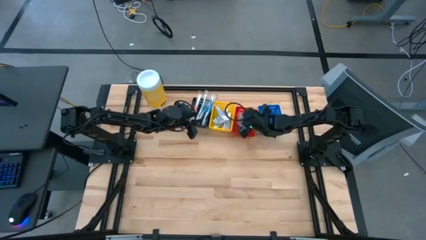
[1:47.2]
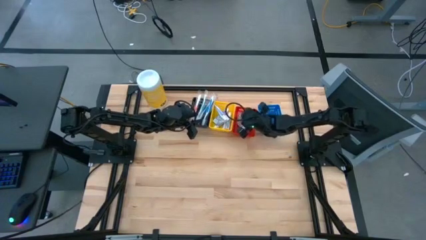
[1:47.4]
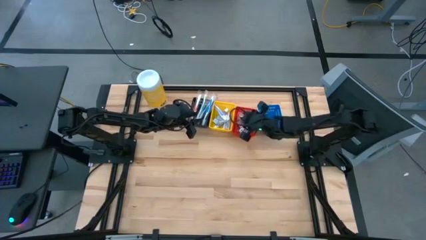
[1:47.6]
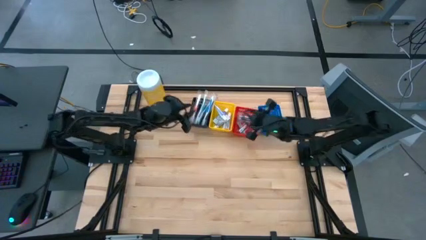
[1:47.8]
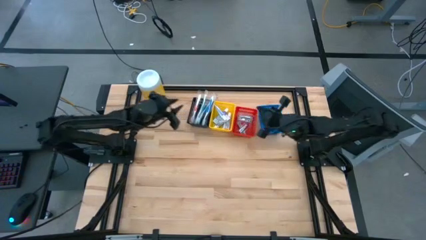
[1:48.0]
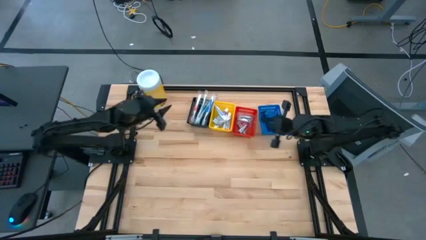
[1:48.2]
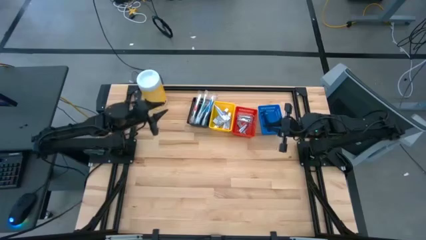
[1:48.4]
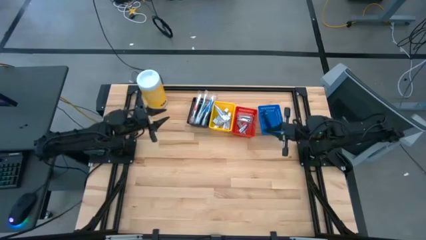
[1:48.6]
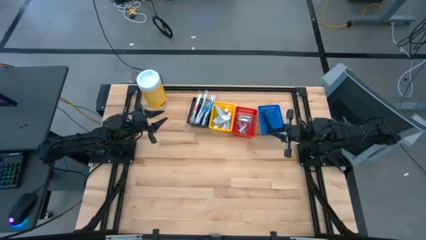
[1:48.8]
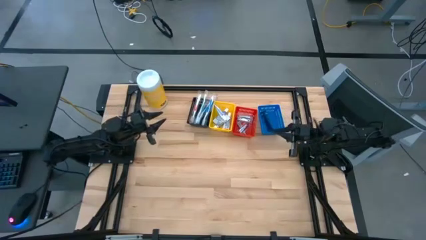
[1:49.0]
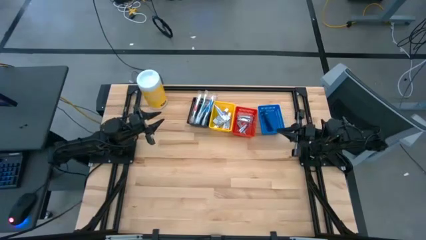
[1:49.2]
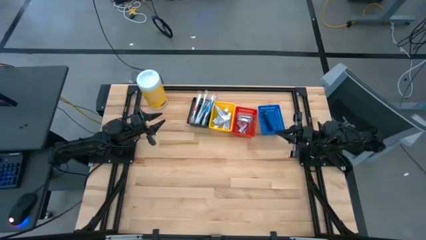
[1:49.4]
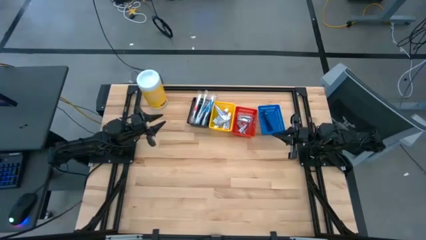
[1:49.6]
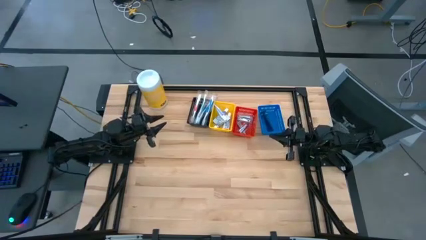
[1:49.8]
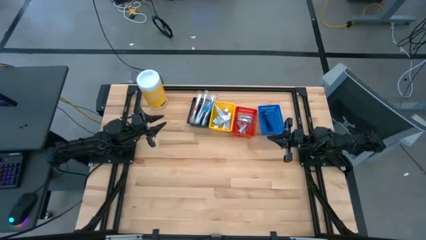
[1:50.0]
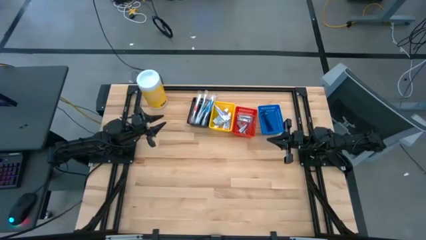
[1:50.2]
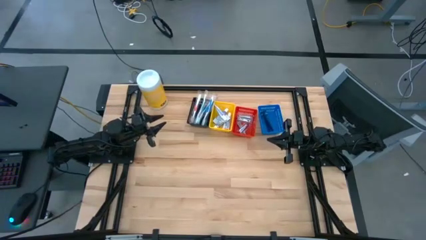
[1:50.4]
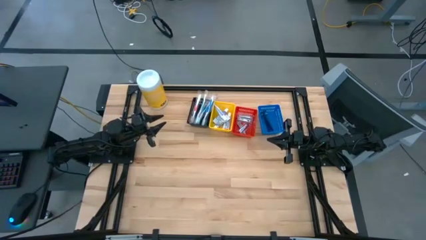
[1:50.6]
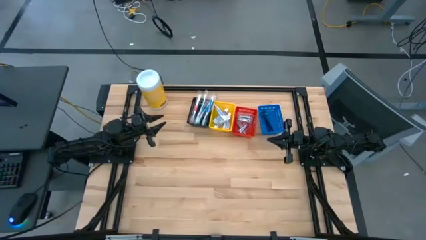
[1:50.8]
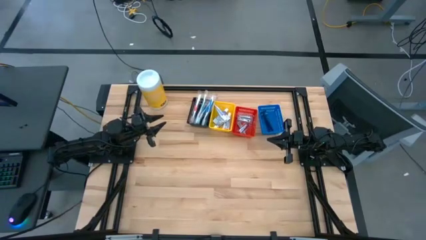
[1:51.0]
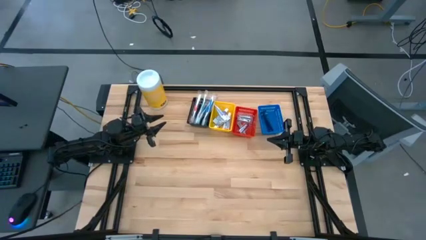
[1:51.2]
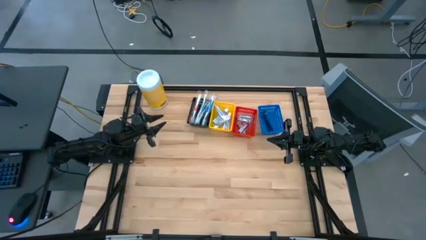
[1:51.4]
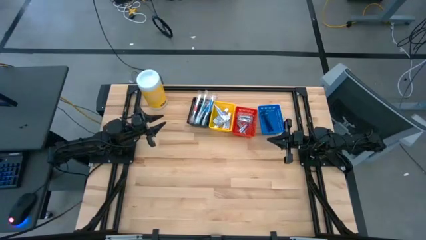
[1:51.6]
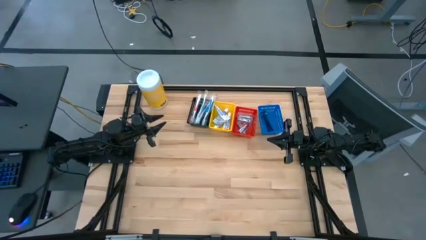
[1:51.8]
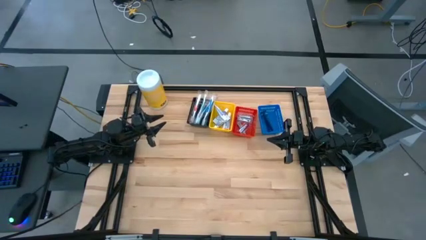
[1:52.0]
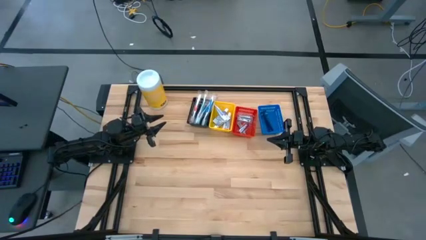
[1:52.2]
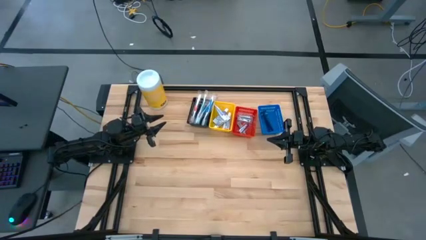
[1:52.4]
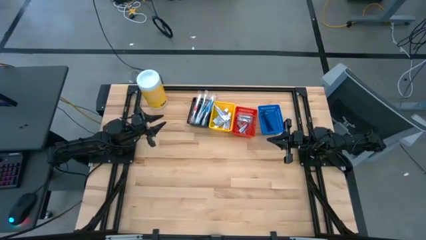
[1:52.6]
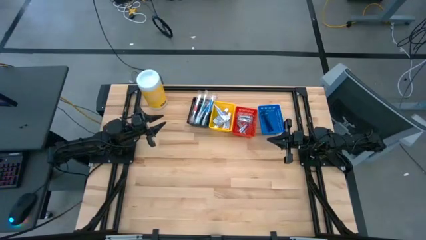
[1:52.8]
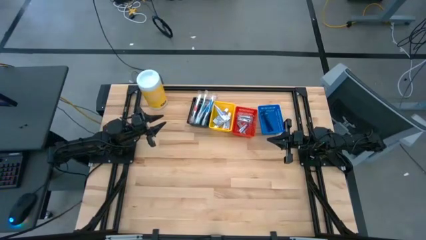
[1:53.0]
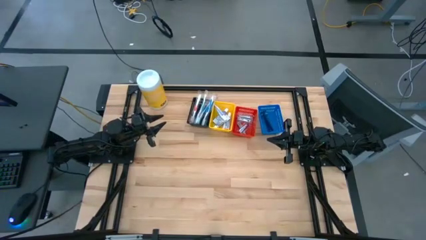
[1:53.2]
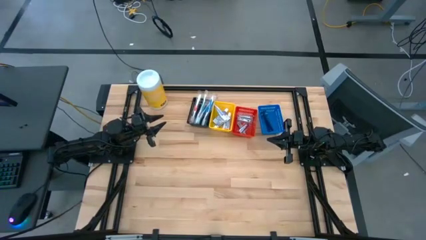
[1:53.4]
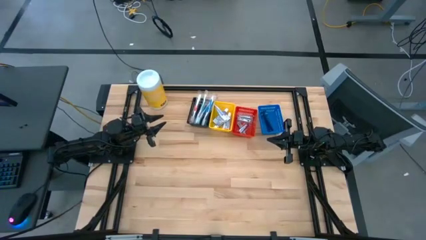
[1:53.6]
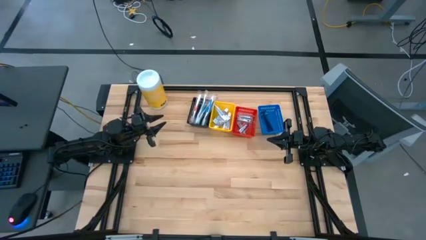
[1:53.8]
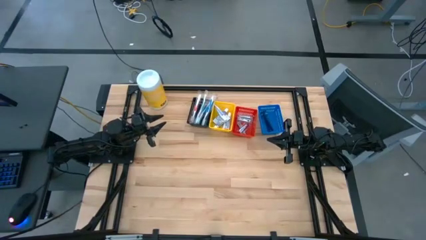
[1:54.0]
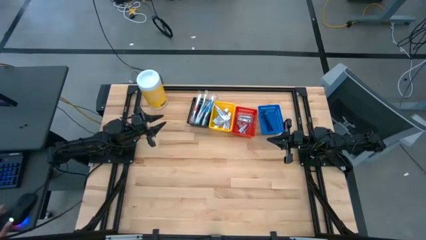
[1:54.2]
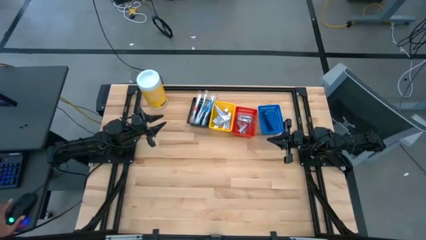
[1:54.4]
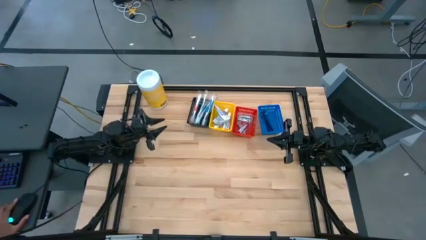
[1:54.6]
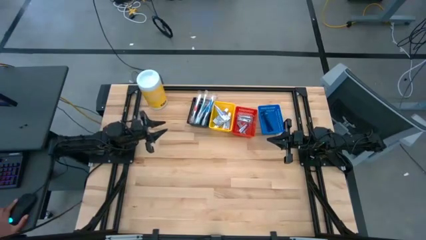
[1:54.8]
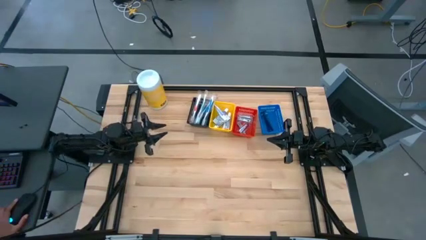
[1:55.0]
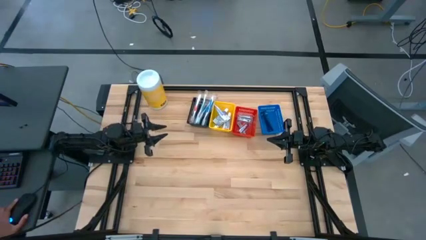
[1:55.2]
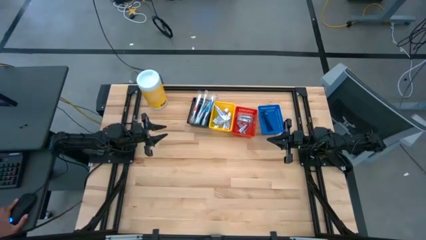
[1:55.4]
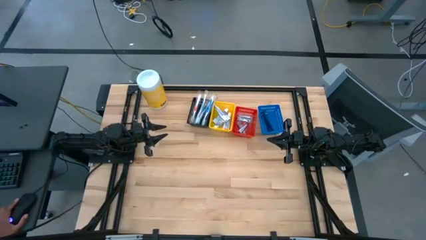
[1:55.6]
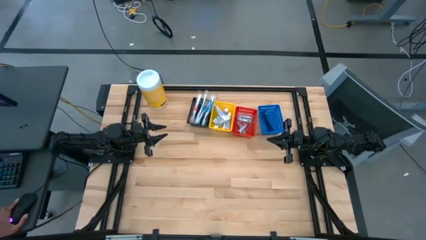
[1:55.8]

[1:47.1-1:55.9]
Task: Pick & Place Travel size toiletries
Return to Home Position

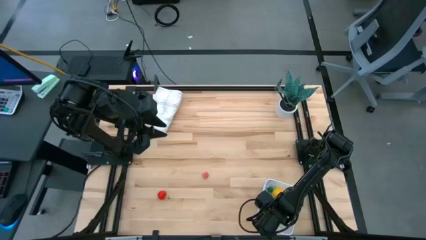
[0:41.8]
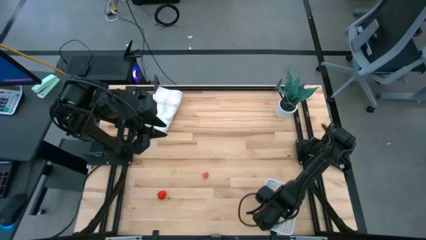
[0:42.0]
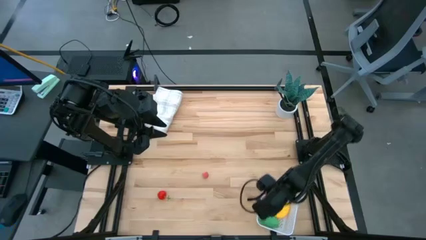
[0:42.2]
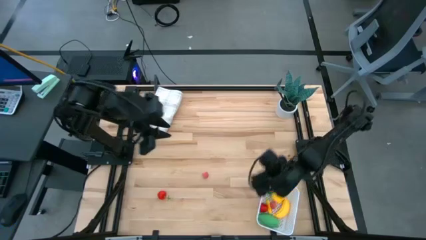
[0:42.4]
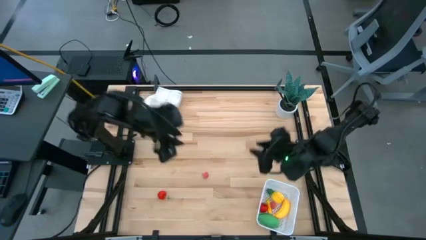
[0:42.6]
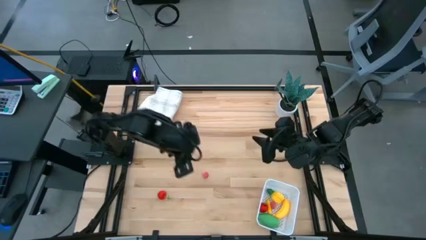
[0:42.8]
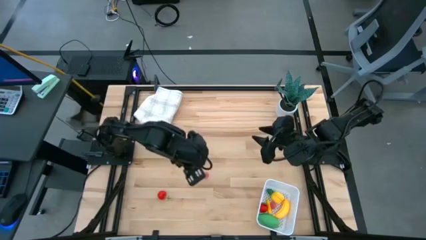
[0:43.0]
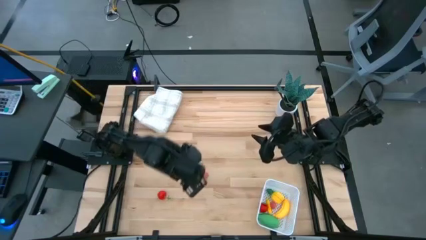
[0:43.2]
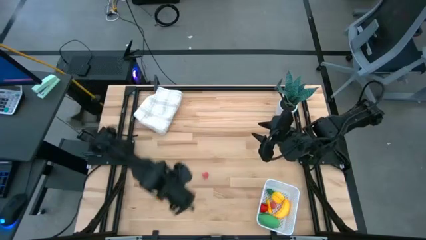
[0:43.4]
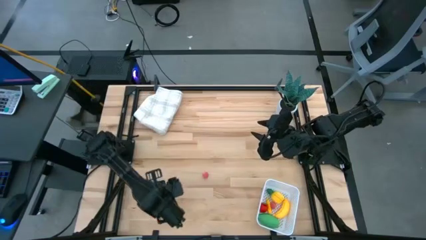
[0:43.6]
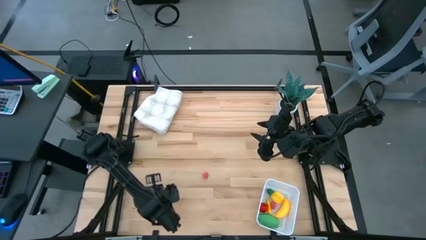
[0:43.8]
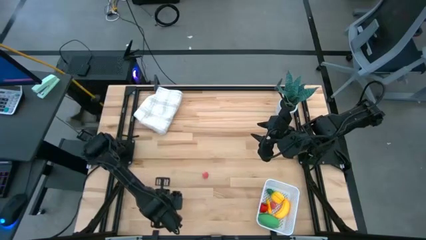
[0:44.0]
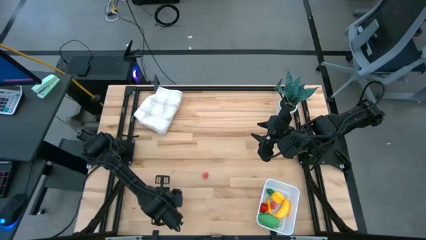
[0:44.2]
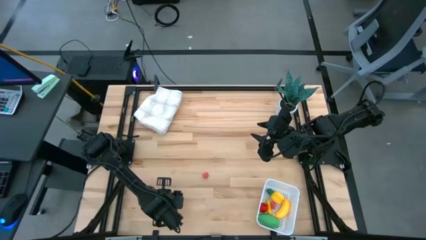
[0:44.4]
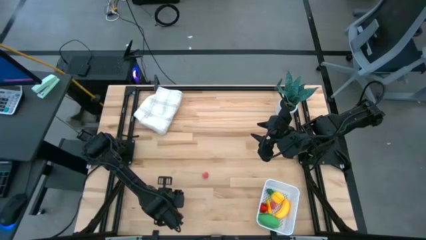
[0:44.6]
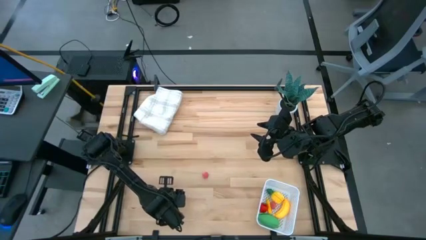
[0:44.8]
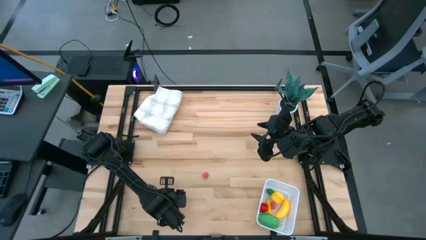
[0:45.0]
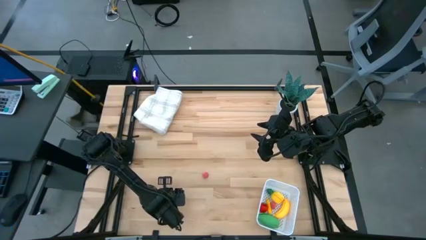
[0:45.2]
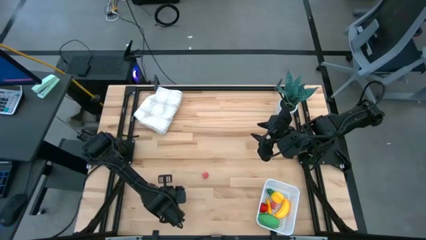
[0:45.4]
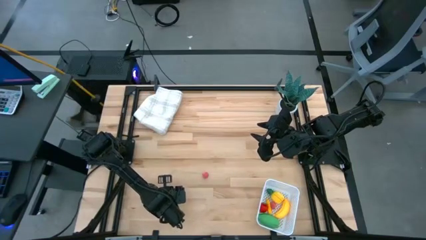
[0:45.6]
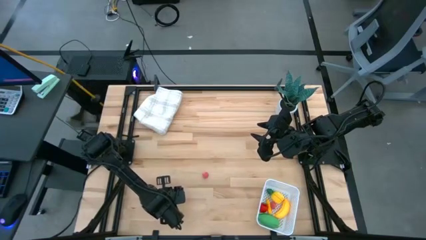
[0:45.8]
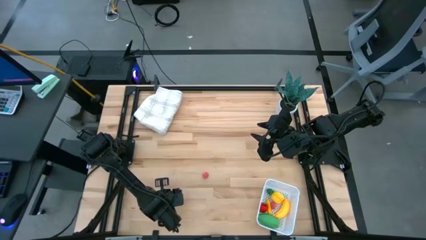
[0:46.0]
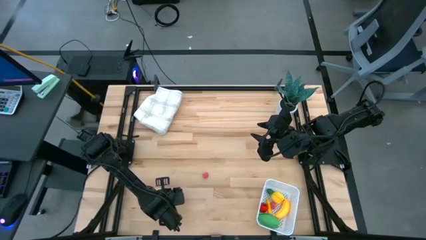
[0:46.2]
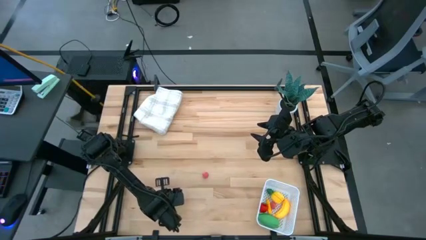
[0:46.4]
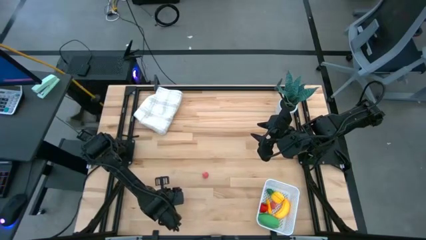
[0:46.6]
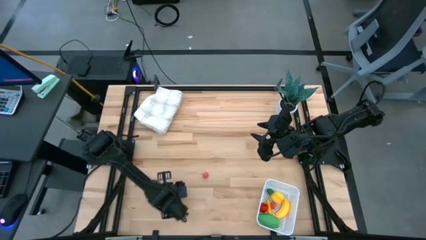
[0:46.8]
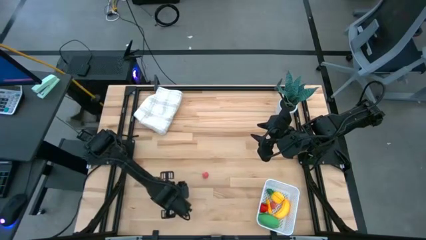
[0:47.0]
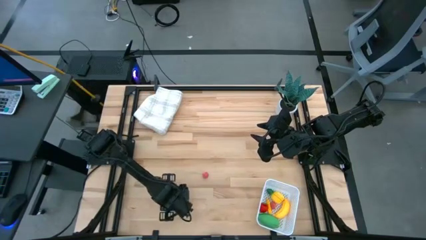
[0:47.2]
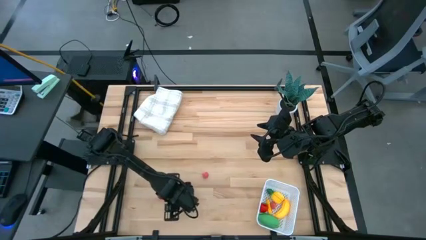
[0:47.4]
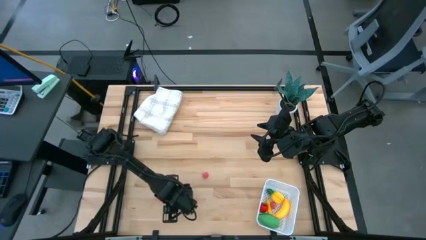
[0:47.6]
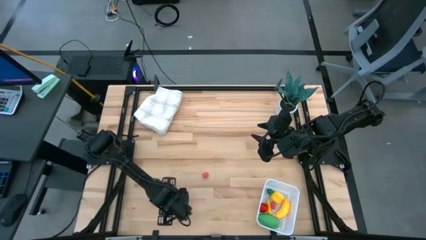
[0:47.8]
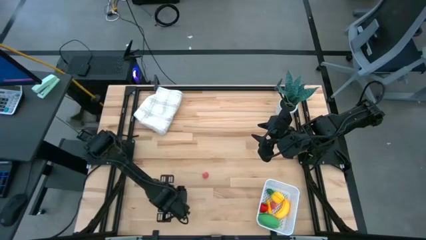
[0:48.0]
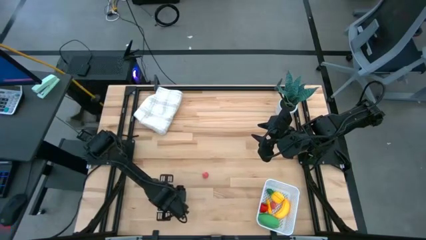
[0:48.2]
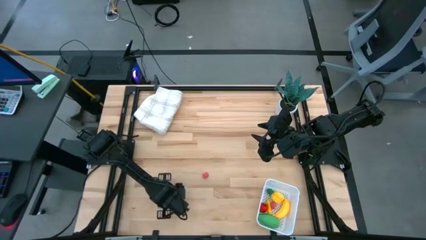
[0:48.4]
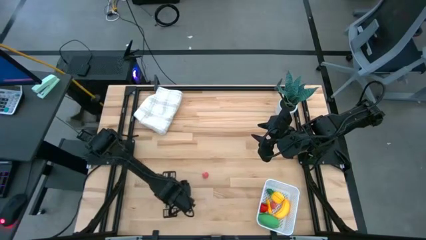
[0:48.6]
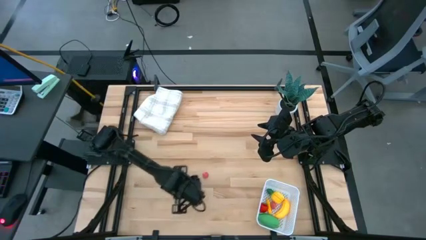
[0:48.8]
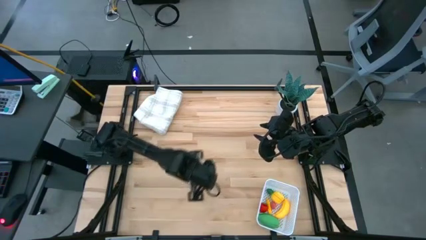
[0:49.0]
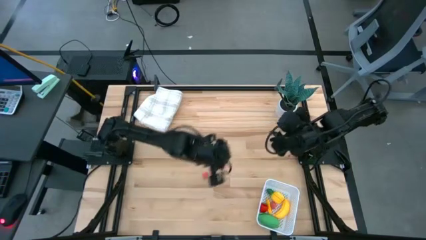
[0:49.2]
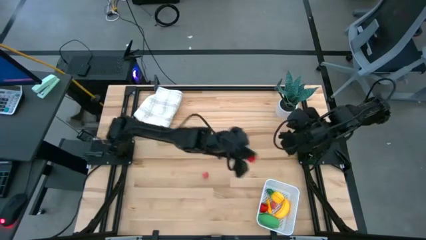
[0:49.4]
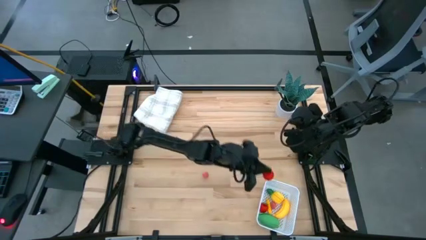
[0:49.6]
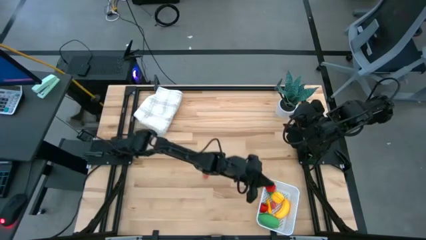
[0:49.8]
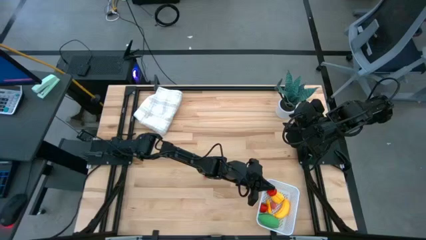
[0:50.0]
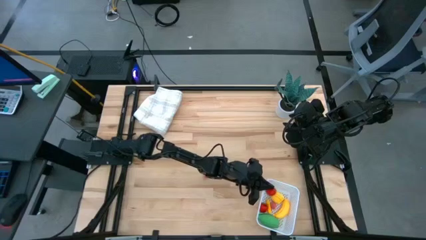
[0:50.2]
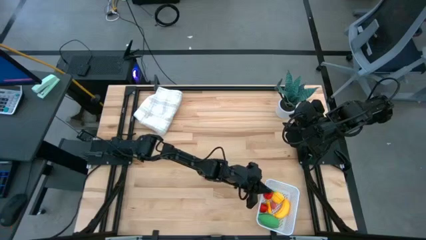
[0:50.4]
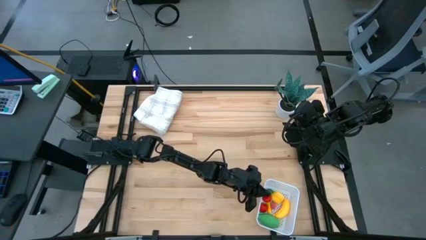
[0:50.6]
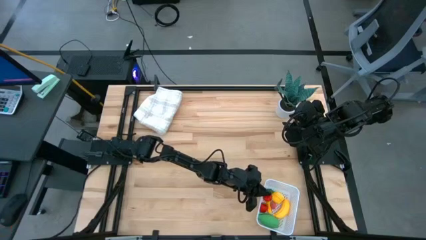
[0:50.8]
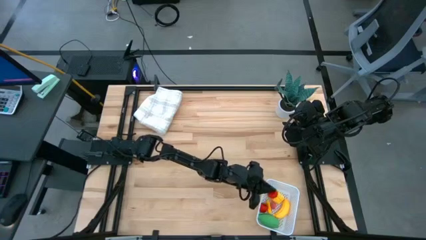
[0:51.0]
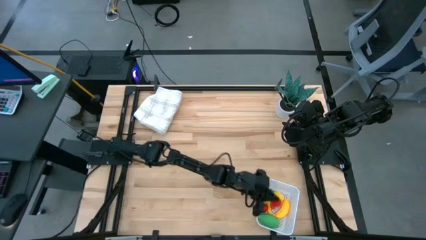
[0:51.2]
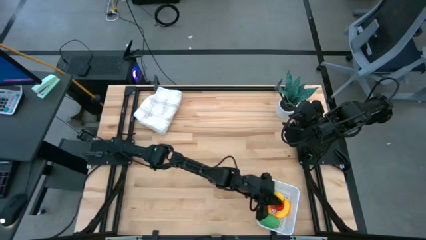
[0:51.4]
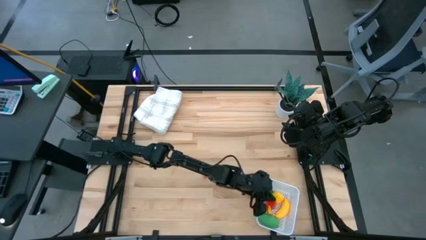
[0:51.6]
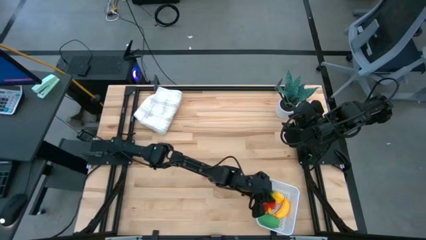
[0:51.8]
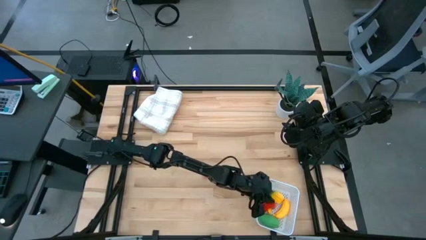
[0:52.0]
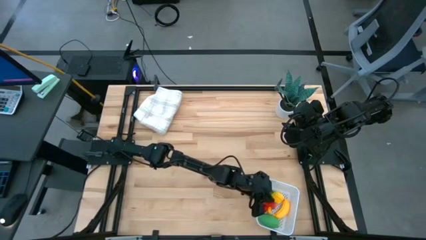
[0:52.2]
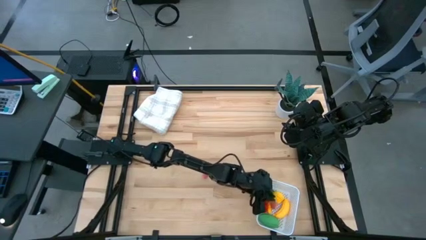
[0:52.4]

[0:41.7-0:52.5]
Task: Pick and placing Produce into tupperware
Put the red strawberry into the white basket
